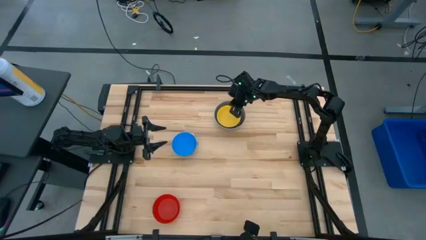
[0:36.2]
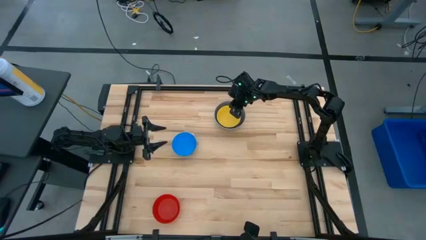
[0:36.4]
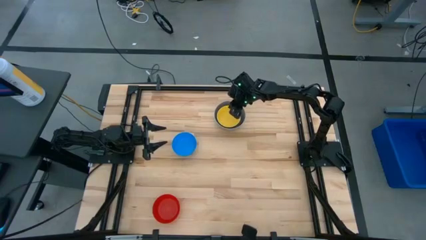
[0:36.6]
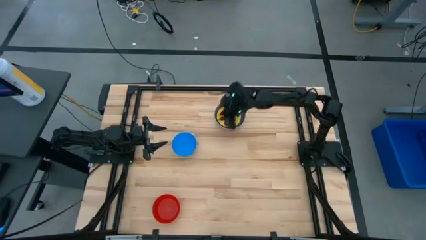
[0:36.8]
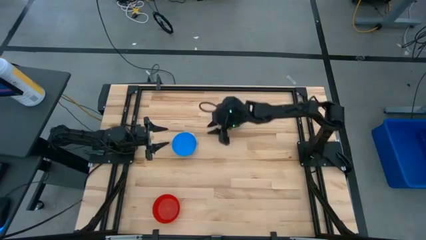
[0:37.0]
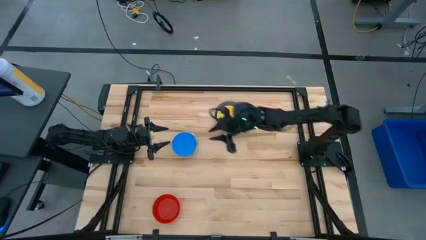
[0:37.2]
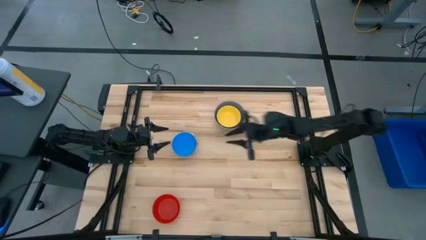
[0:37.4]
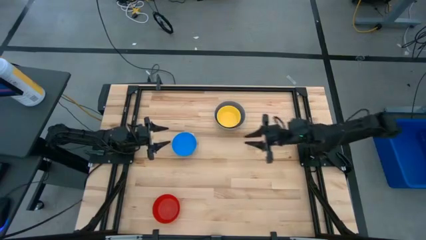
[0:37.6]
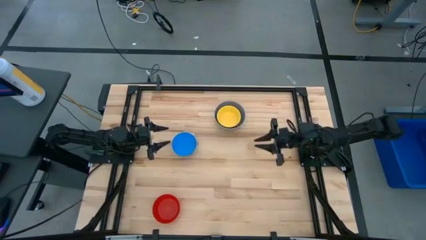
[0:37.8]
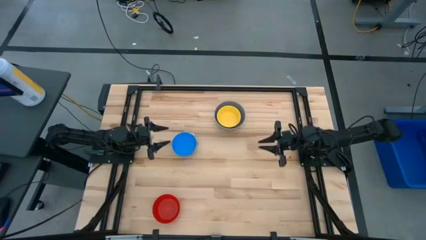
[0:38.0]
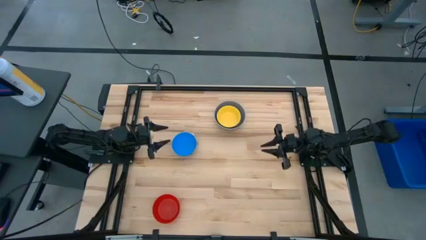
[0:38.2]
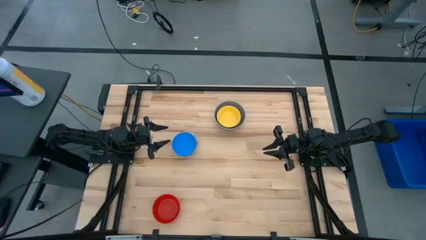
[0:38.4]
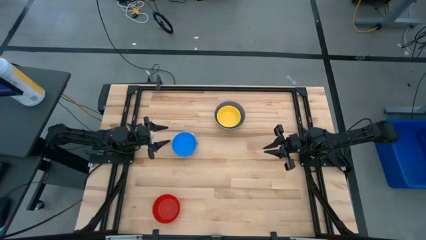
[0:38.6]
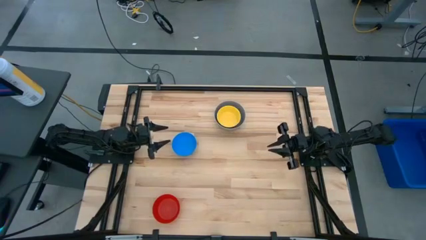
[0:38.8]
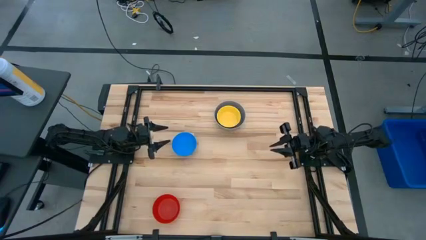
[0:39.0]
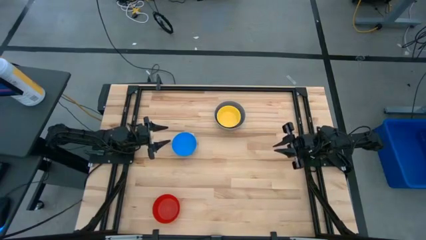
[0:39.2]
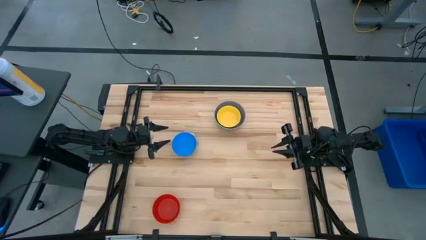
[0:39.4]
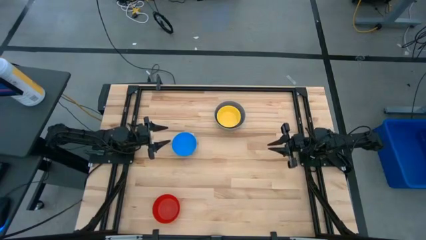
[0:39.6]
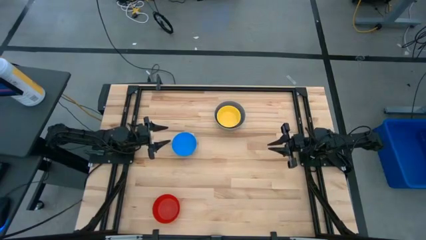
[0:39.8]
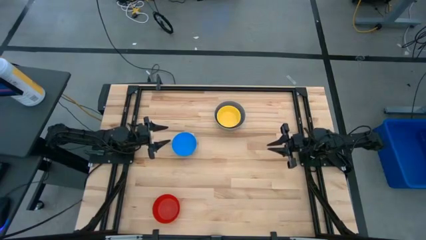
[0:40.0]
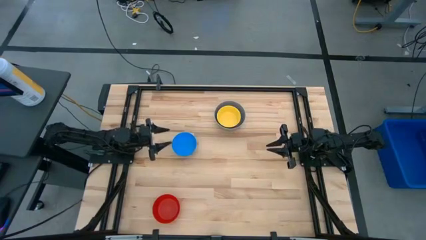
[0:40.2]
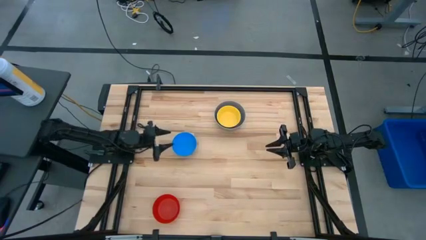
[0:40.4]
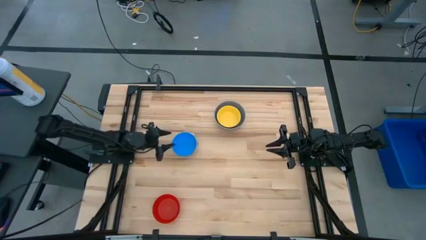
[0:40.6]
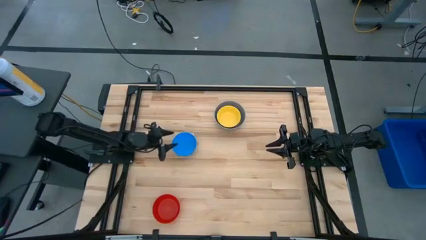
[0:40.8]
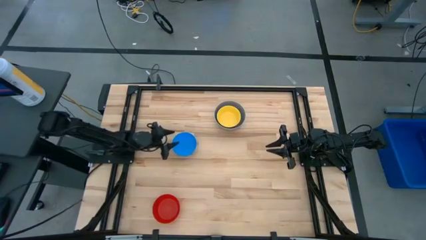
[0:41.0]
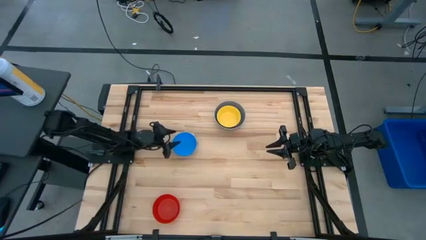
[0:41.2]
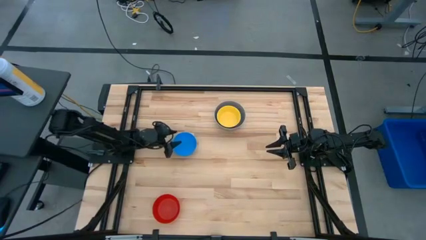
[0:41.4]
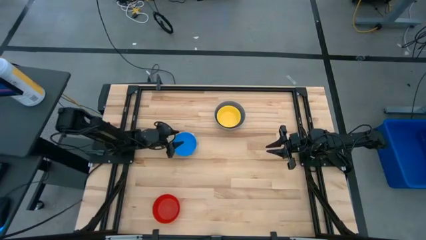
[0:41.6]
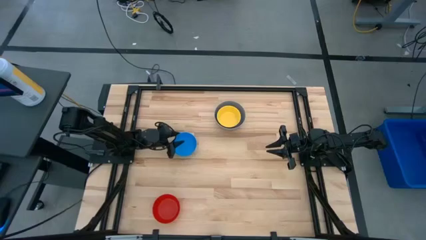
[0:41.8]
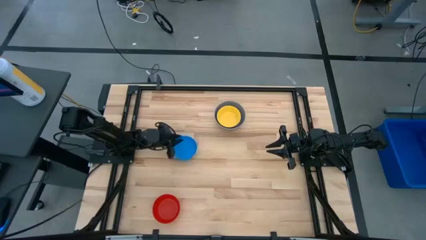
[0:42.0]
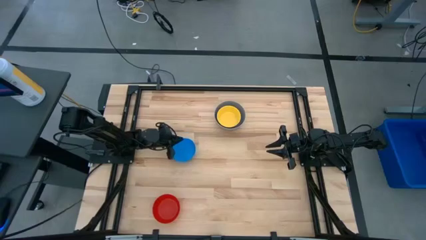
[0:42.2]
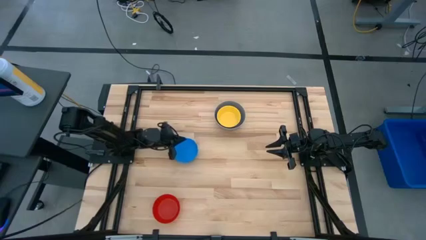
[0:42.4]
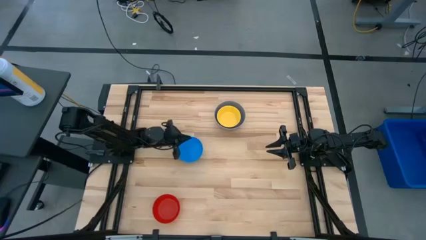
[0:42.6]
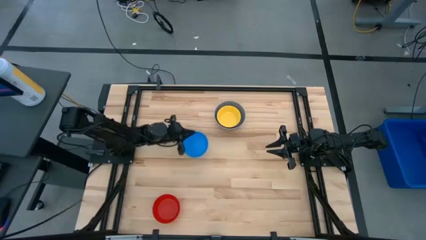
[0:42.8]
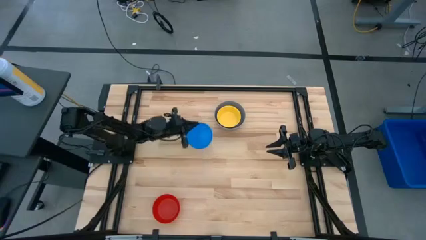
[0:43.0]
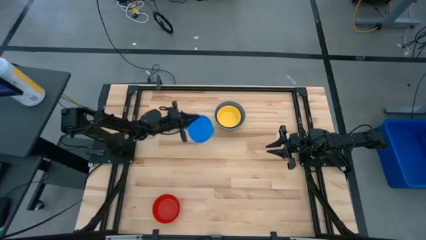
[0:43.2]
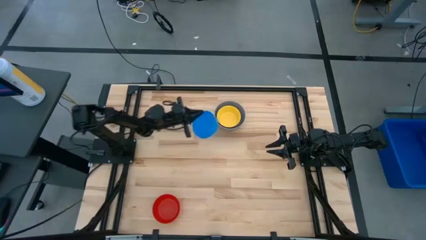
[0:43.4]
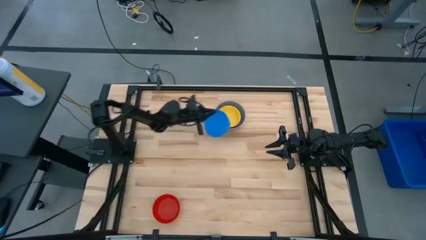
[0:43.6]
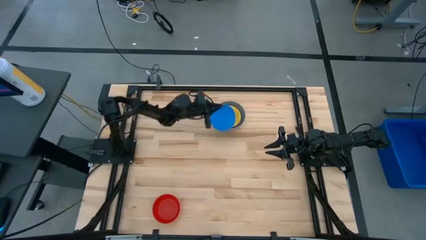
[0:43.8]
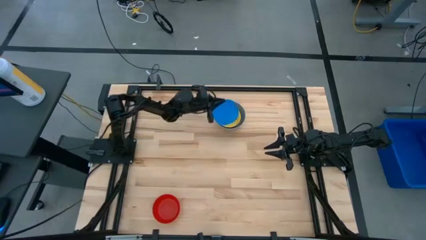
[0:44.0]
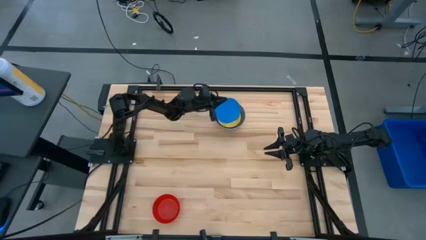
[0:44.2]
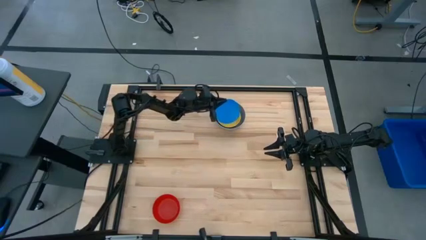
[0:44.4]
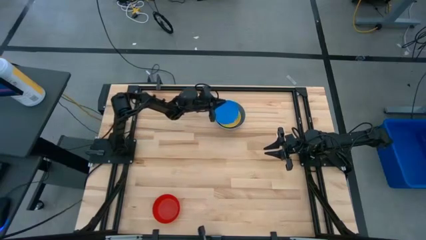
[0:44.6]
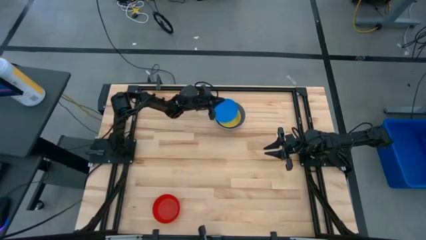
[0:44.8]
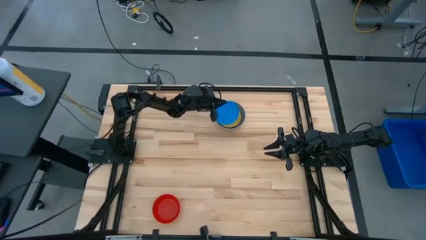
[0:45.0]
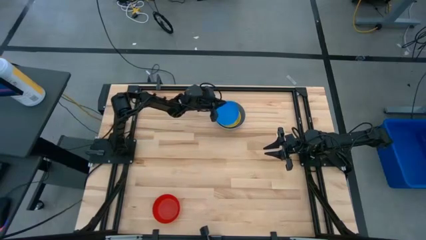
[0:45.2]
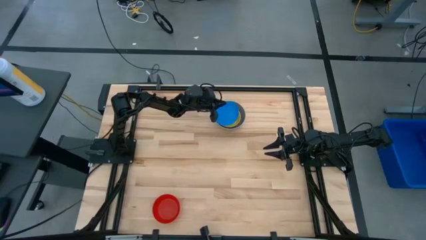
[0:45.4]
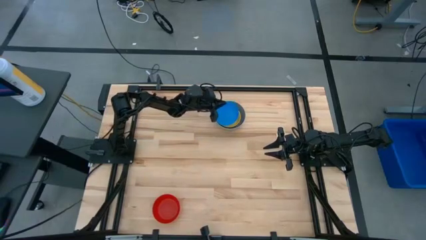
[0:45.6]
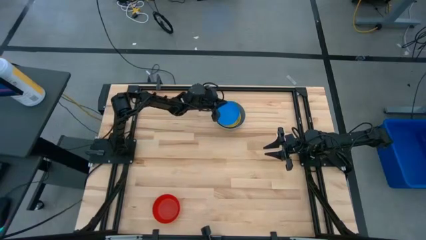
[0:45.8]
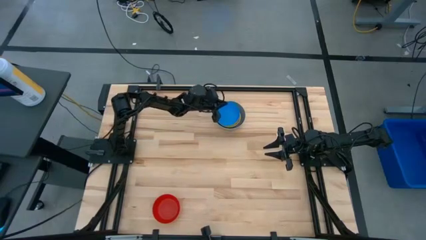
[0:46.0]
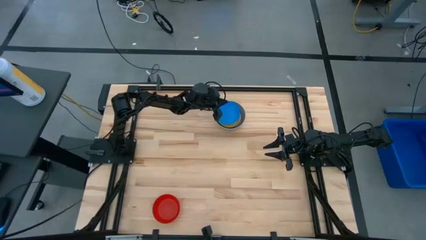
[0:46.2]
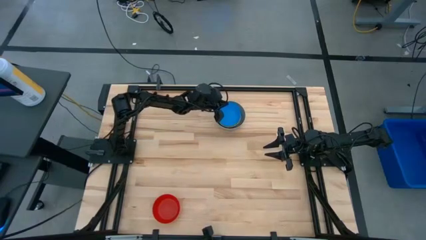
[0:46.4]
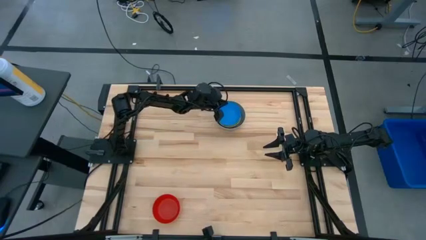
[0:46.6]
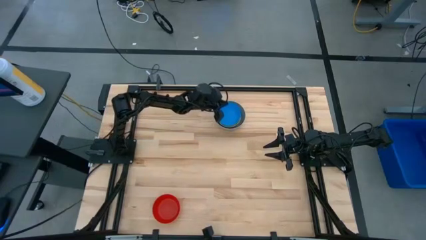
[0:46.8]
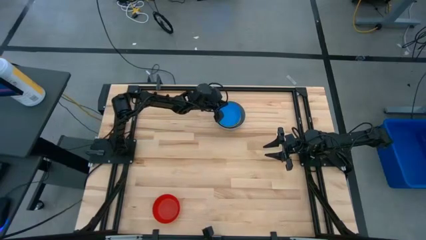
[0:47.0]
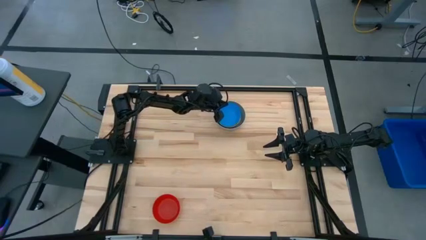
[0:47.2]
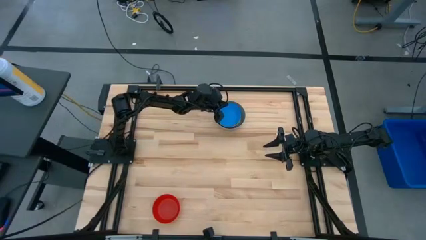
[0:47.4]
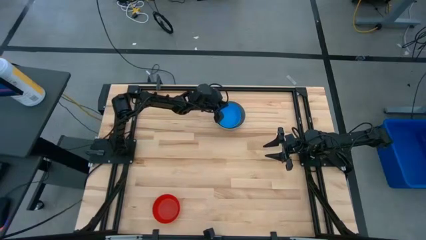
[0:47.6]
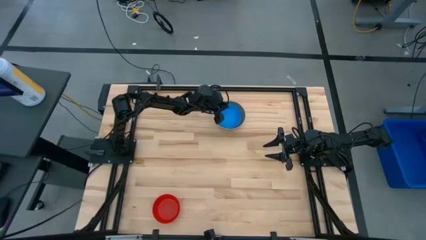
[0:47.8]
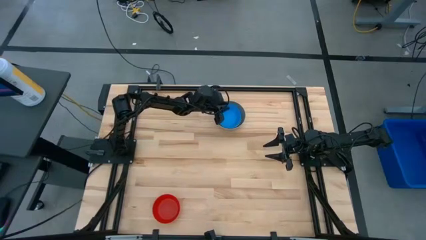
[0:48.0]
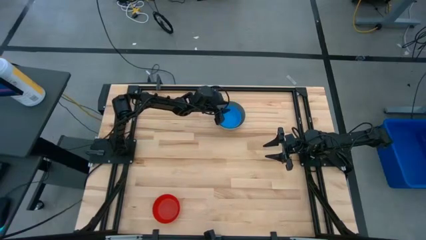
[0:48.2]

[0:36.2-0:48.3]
Stack the light blue bowl on the yellow bowl

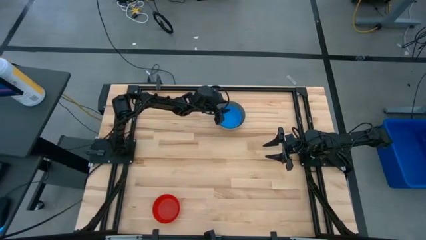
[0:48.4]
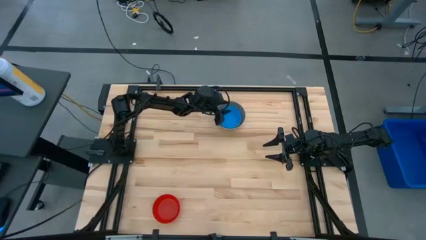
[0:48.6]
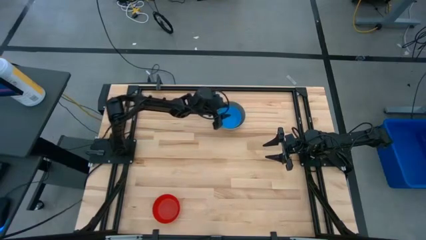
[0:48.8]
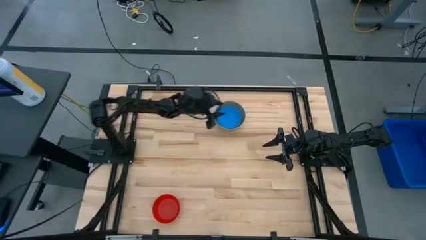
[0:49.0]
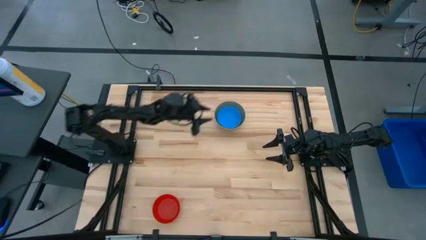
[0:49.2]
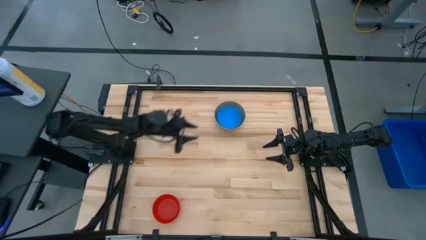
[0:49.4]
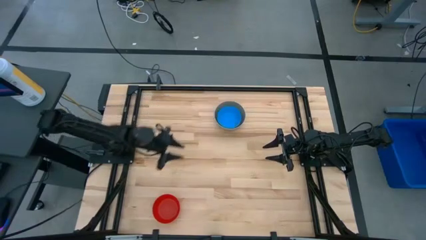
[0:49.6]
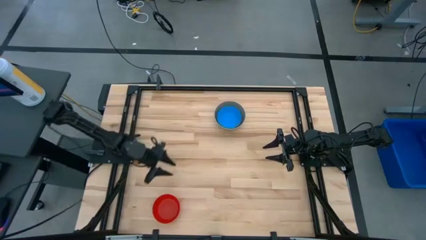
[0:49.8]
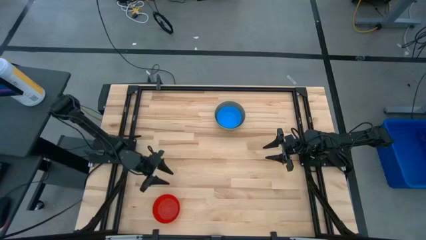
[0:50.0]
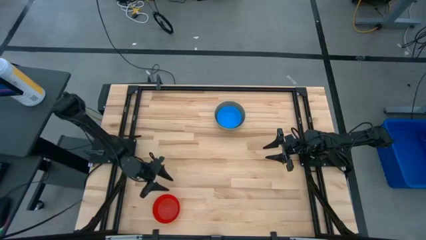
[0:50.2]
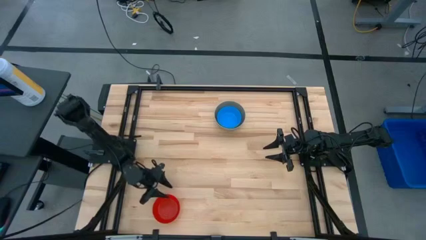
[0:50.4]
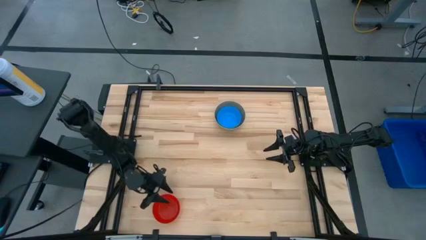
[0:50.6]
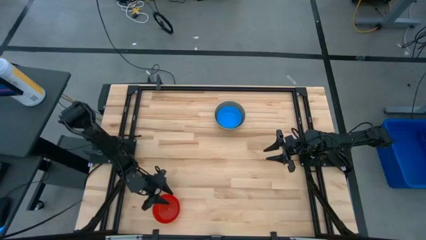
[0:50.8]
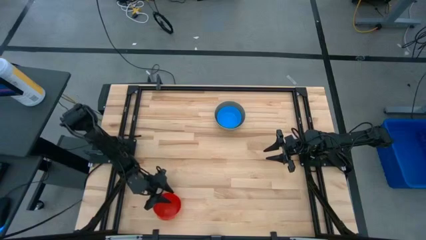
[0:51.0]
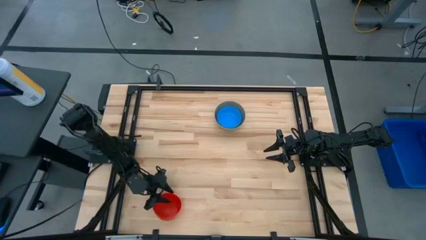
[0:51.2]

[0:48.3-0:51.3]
Stack the red bowl on the light blue bowl
